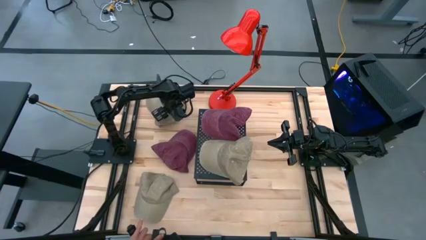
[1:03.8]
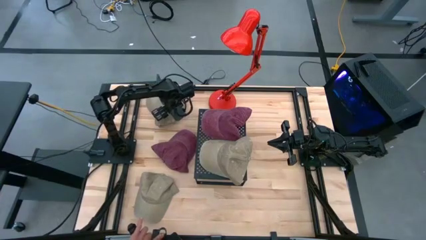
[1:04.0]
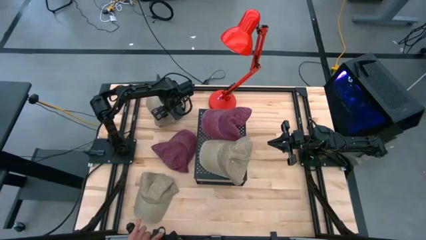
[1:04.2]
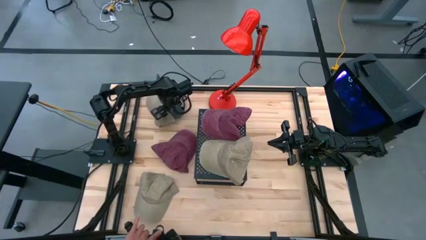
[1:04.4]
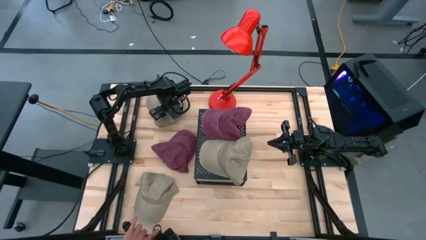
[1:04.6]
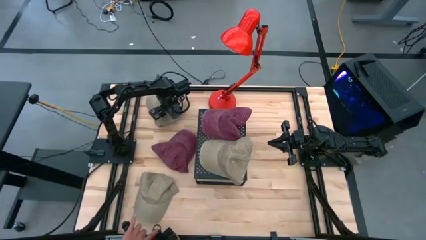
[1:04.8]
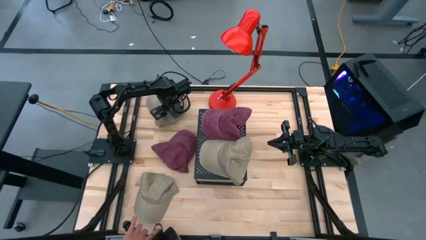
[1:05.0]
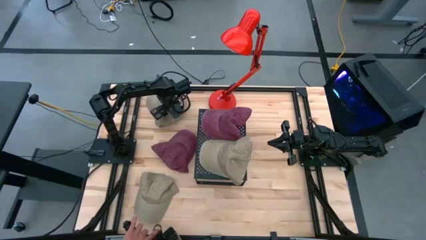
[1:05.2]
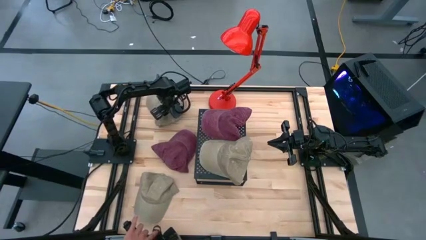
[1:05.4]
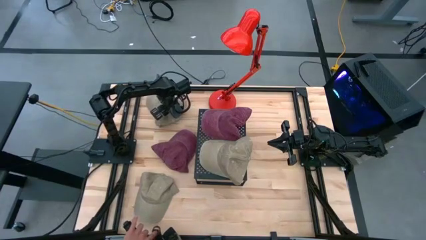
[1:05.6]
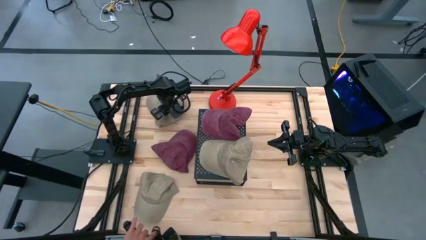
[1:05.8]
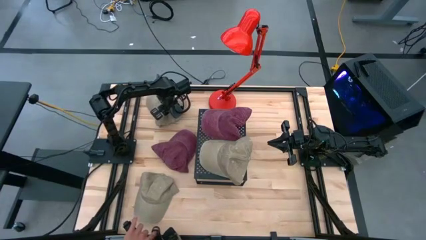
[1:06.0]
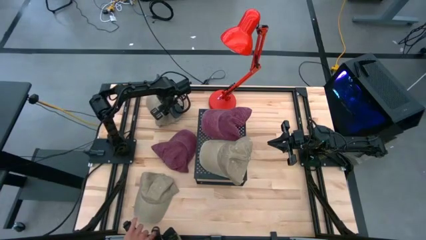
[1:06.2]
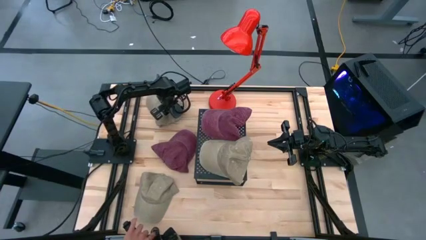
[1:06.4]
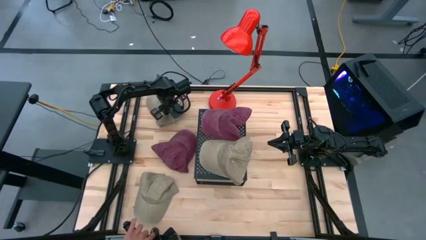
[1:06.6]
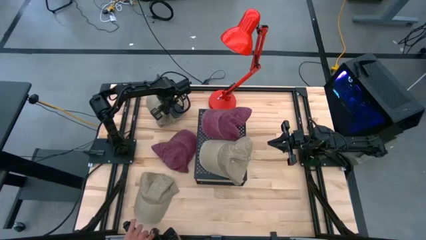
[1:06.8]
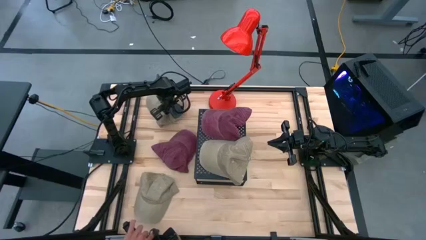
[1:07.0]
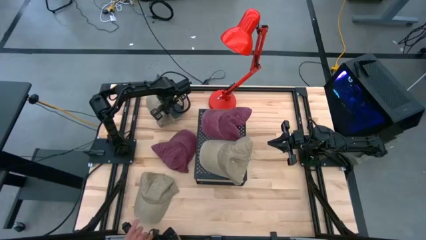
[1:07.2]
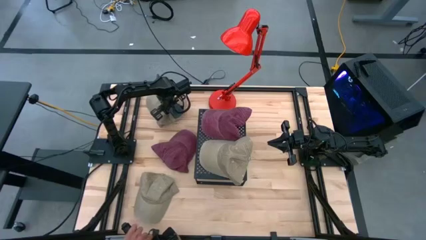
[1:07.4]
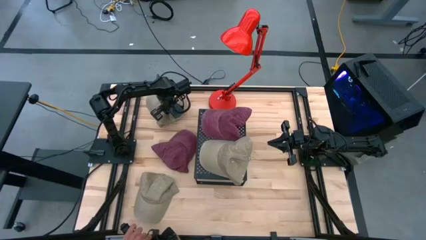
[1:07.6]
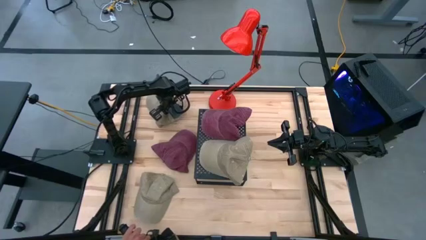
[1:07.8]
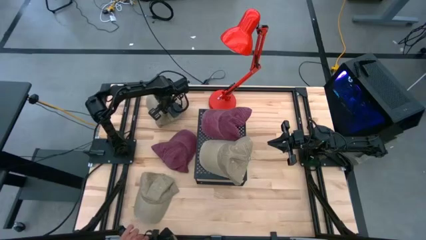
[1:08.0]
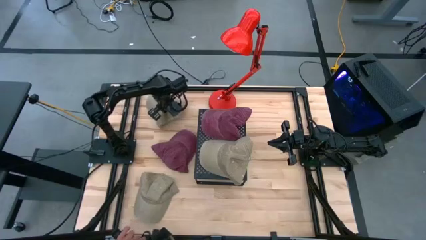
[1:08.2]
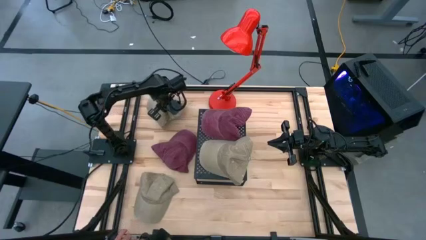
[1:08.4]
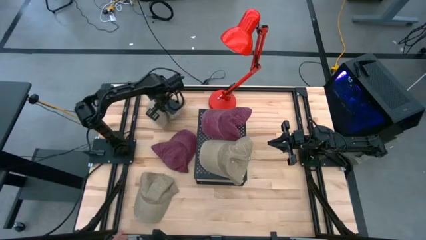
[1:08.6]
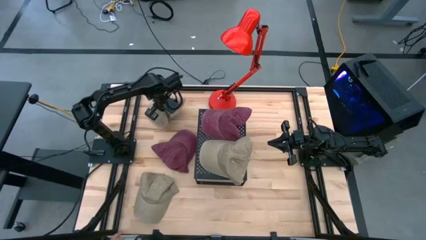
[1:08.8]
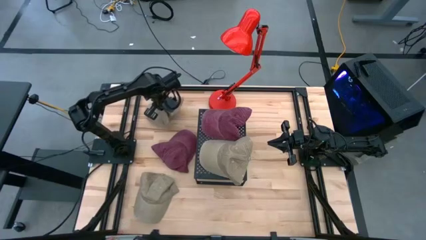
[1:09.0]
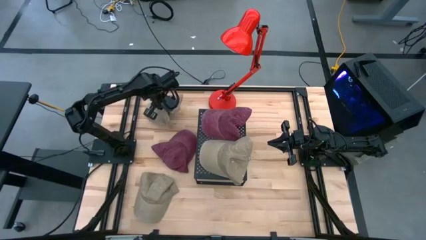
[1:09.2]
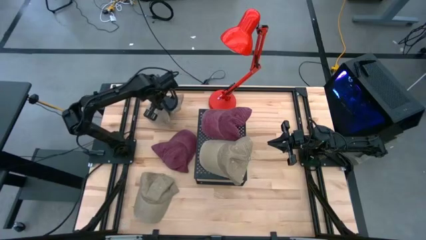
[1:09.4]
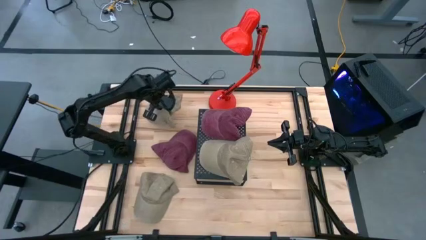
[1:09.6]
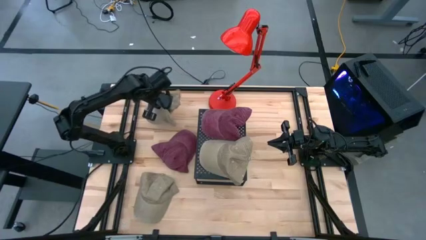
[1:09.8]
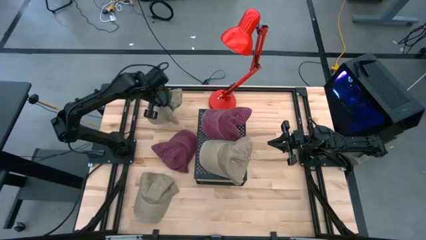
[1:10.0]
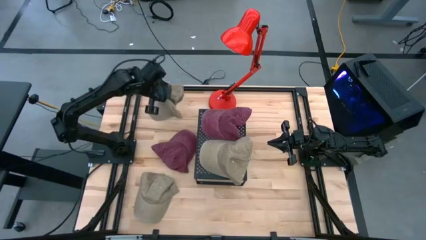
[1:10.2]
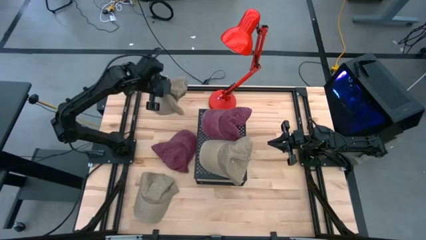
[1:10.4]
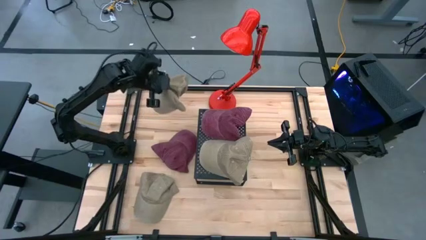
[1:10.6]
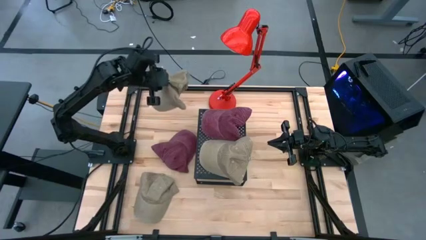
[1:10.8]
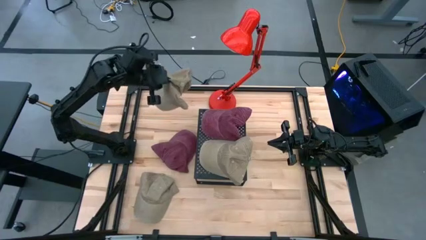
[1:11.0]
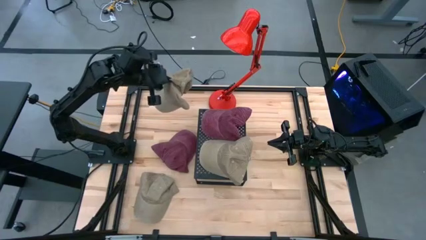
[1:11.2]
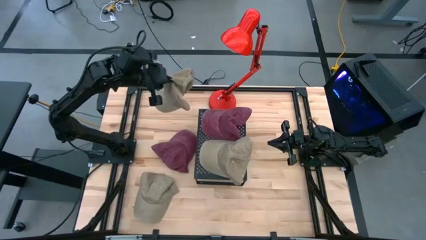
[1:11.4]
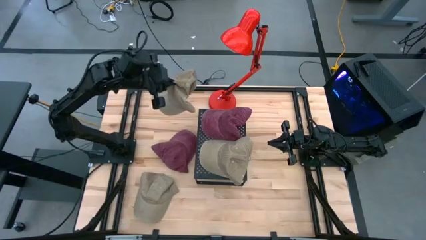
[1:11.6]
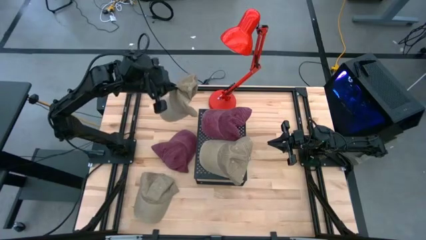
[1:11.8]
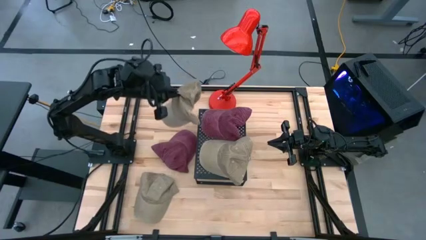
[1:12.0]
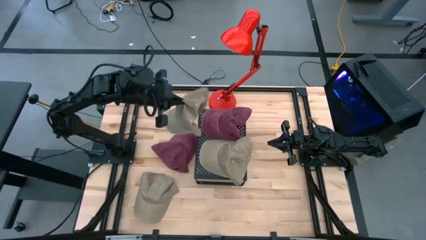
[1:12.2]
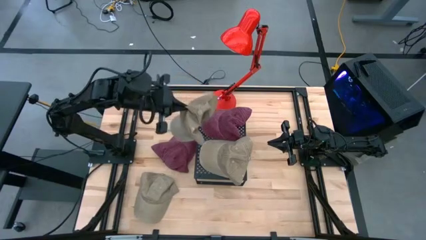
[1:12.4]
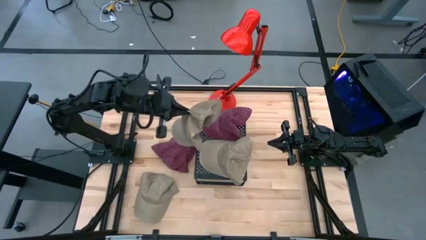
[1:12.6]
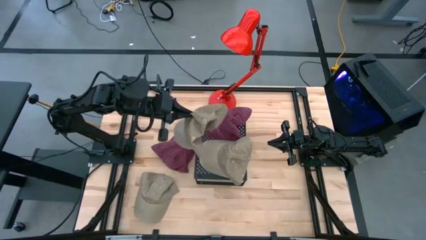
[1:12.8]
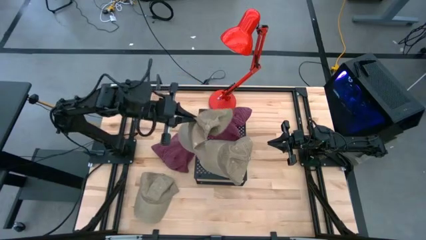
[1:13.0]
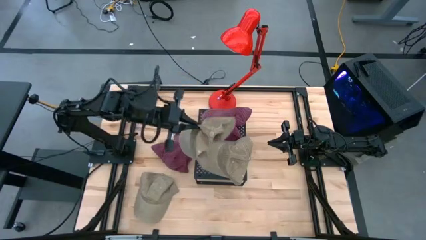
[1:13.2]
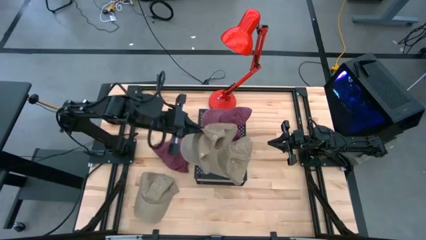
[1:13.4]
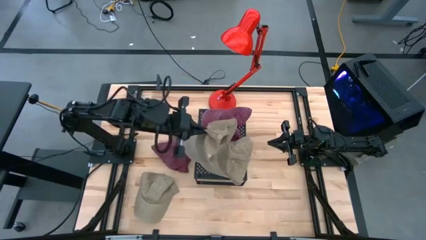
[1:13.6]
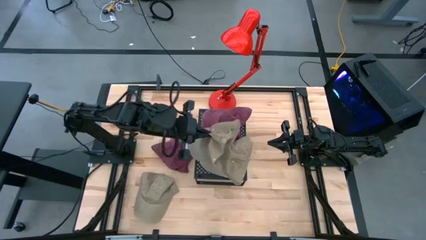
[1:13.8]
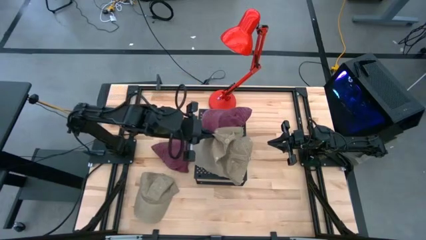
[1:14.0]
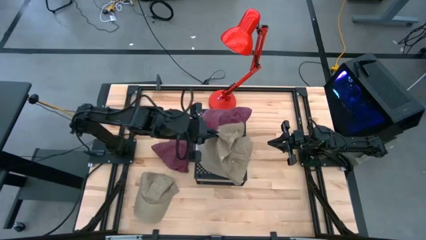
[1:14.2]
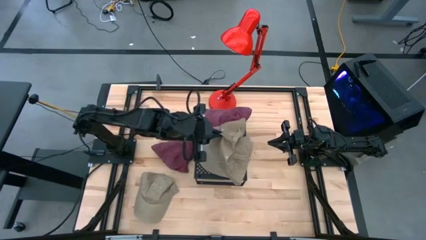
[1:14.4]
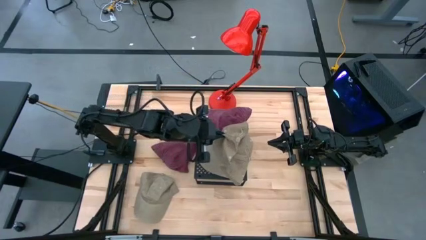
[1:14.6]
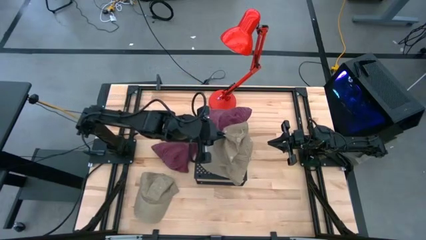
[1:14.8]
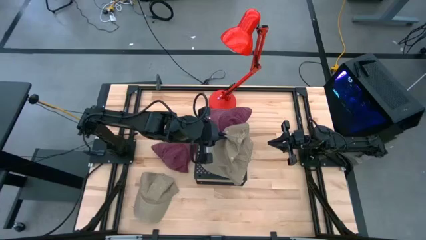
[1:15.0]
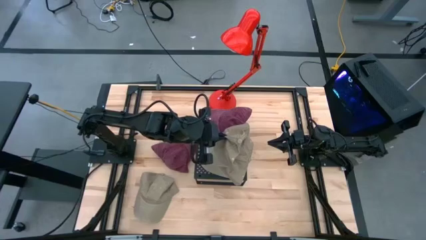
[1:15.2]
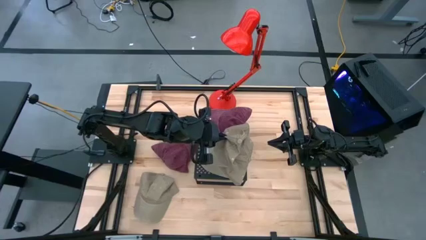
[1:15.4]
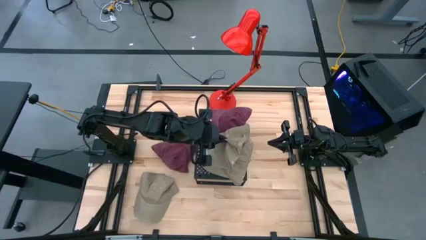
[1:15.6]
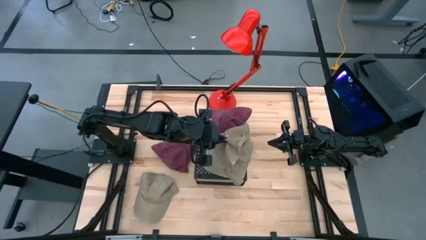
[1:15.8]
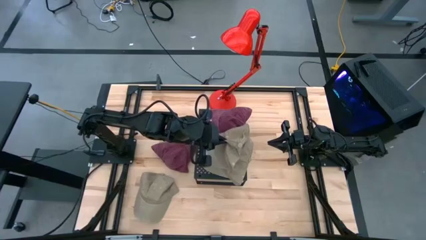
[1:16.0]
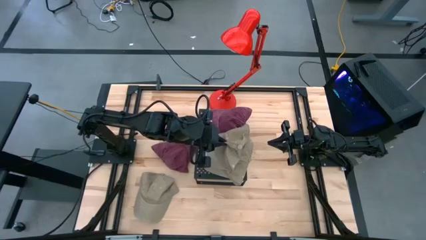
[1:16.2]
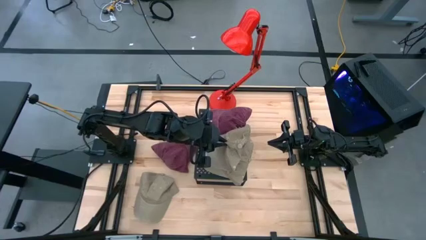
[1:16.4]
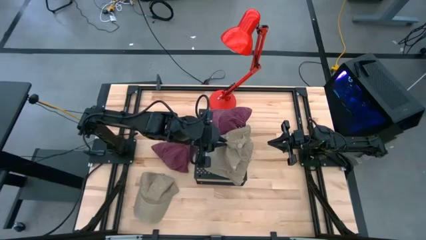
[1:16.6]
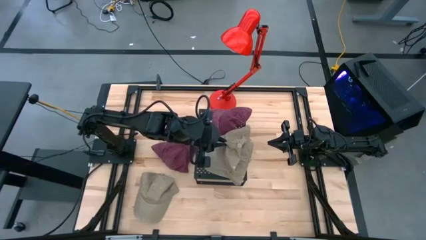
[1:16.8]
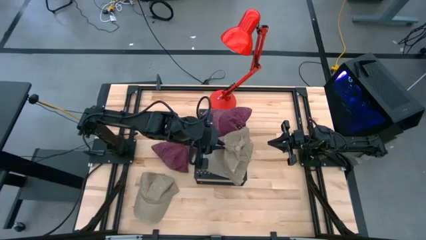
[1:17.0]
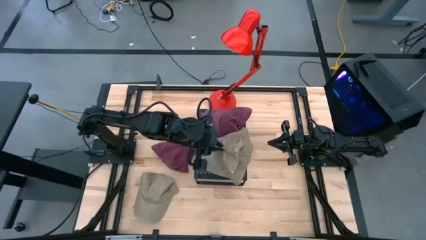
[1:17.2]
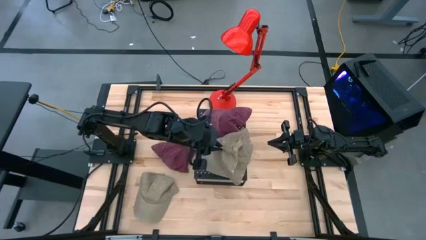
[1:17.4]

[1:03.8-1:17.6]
Task: Pick & Place hat
Stack the top brown cap on top of the brown cap on the shelf
